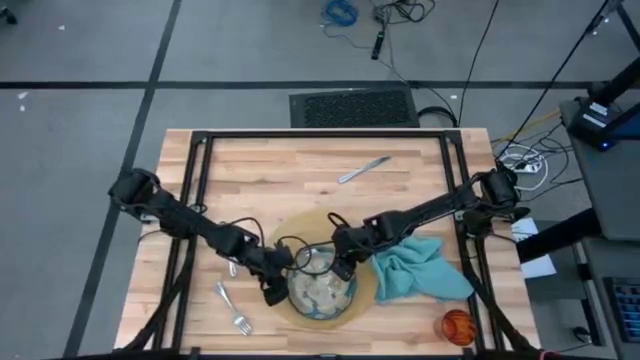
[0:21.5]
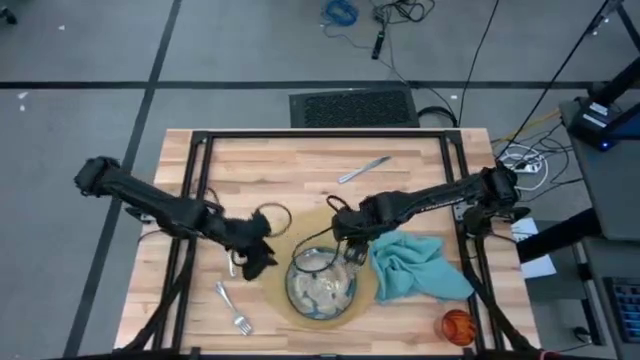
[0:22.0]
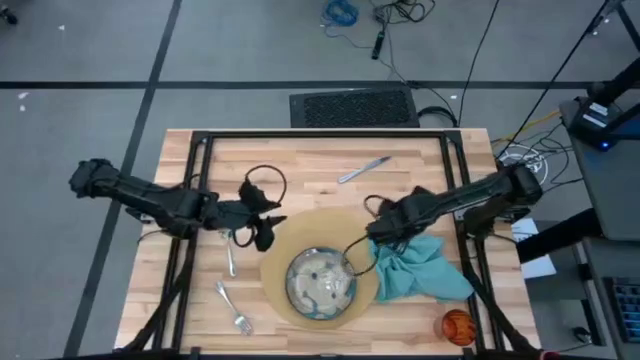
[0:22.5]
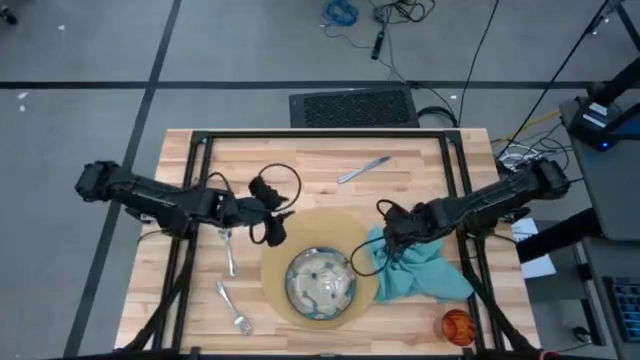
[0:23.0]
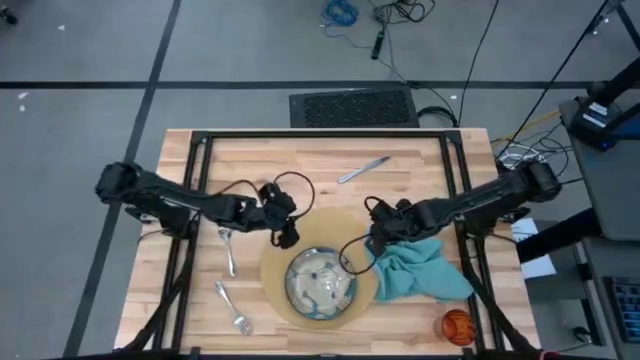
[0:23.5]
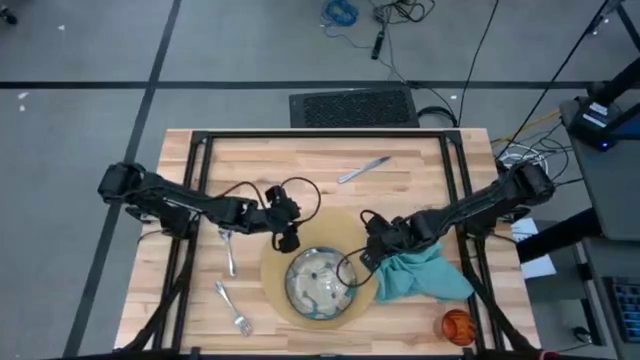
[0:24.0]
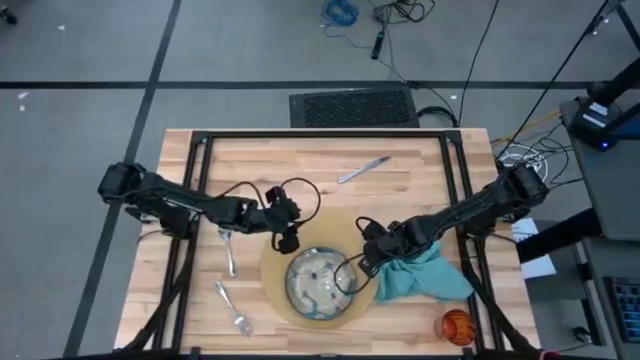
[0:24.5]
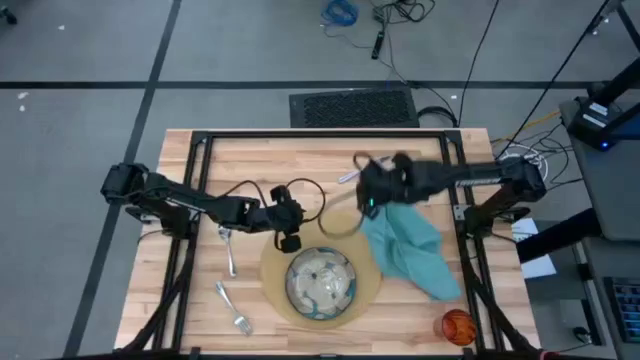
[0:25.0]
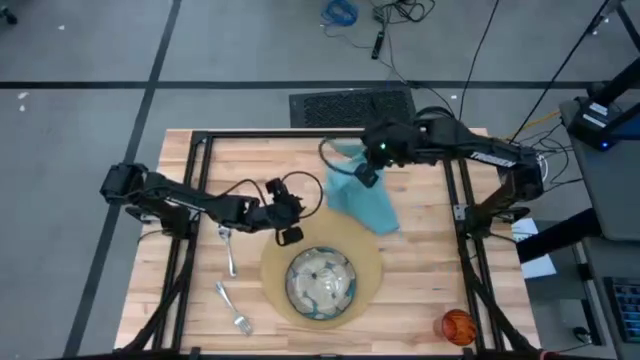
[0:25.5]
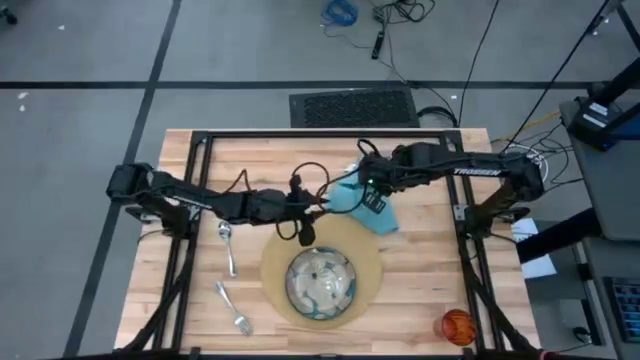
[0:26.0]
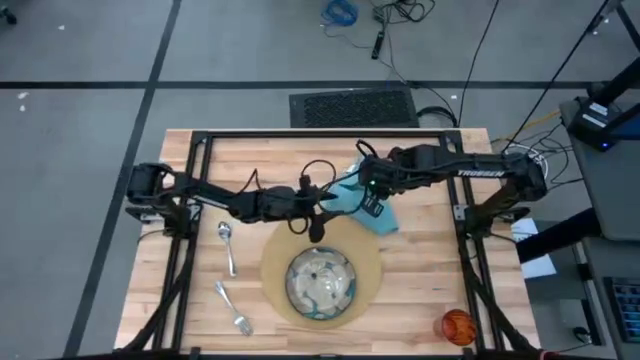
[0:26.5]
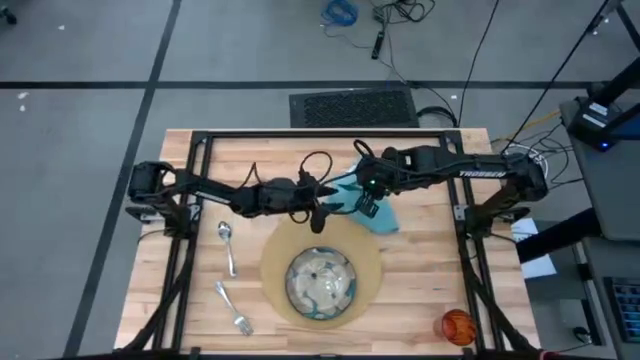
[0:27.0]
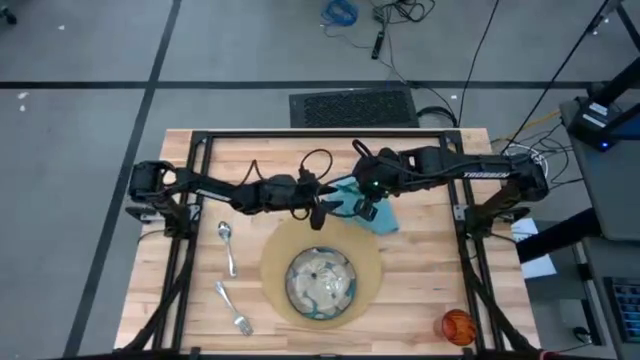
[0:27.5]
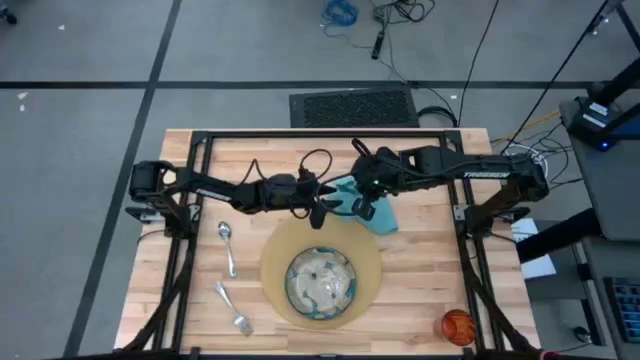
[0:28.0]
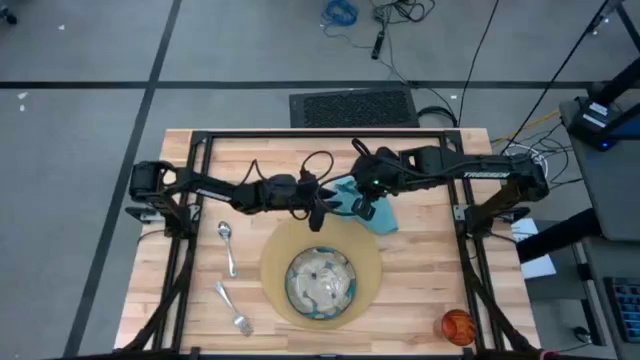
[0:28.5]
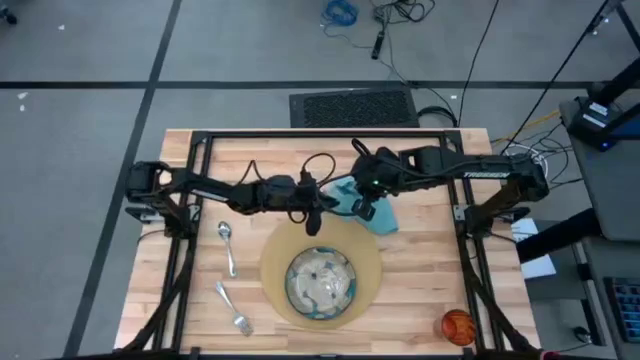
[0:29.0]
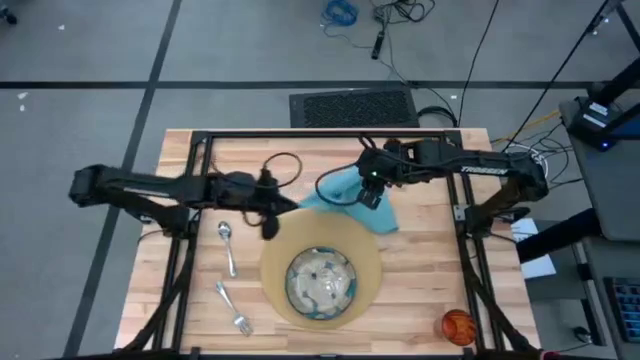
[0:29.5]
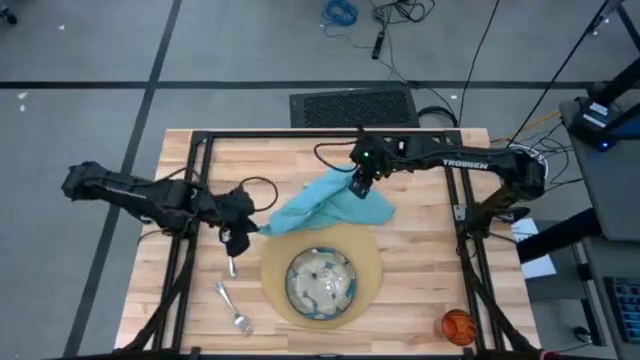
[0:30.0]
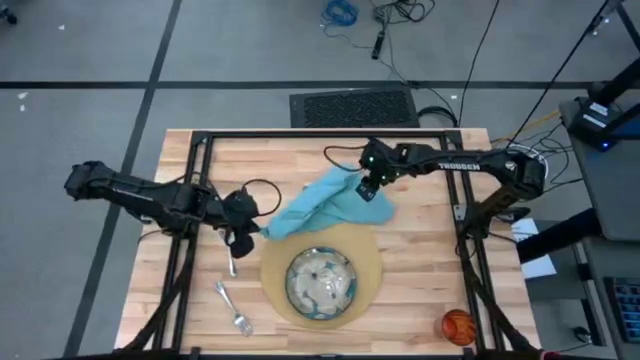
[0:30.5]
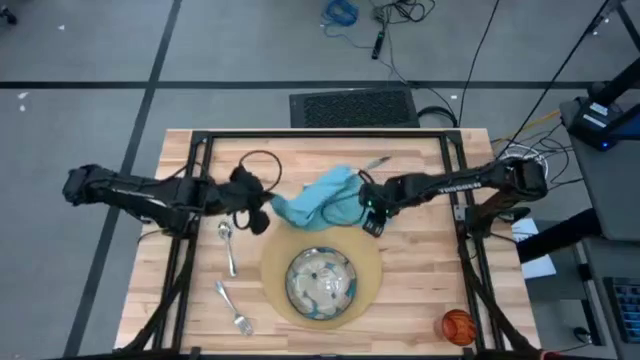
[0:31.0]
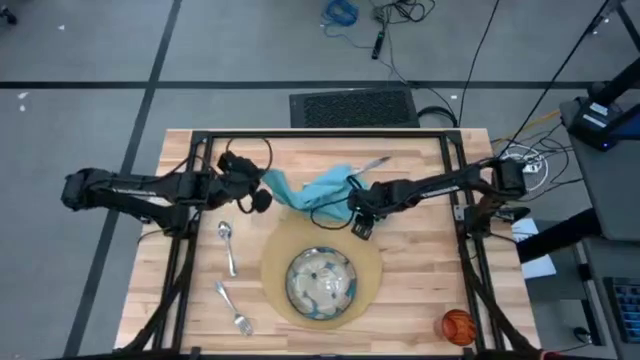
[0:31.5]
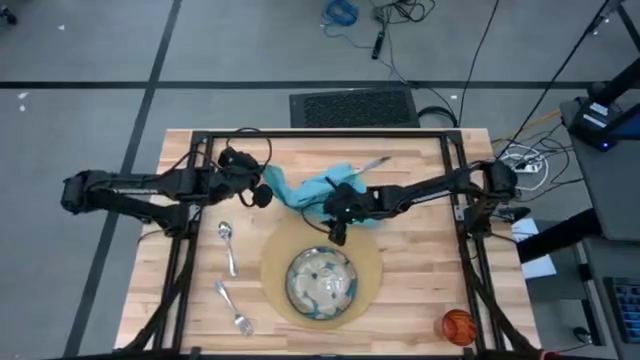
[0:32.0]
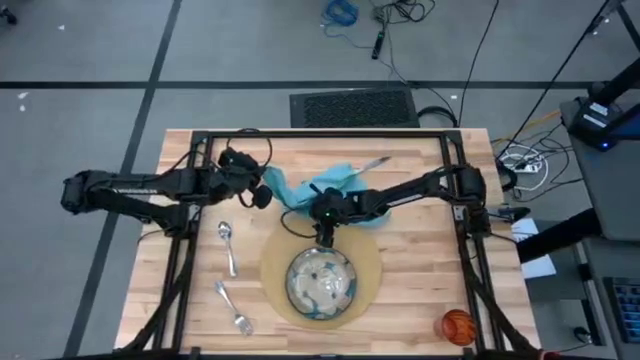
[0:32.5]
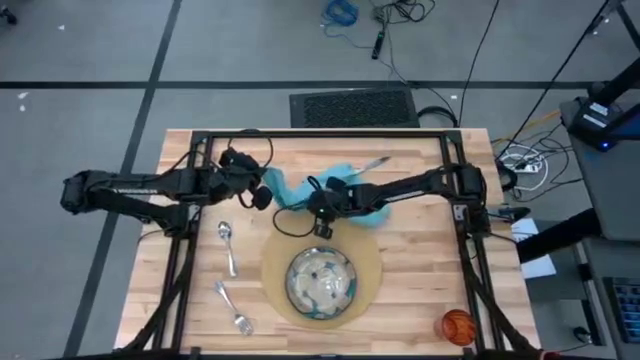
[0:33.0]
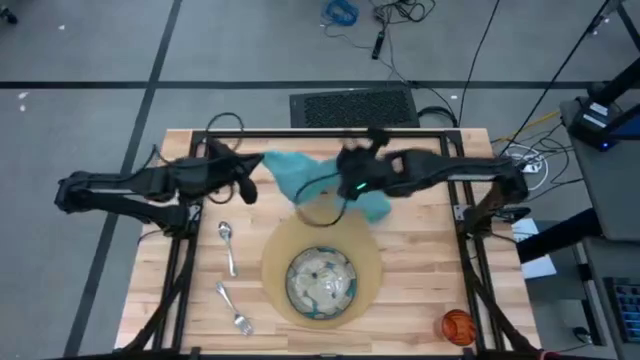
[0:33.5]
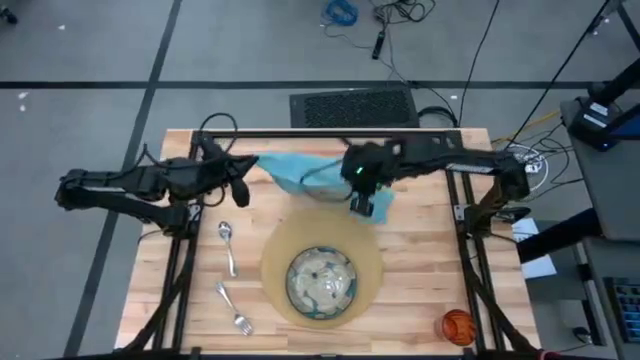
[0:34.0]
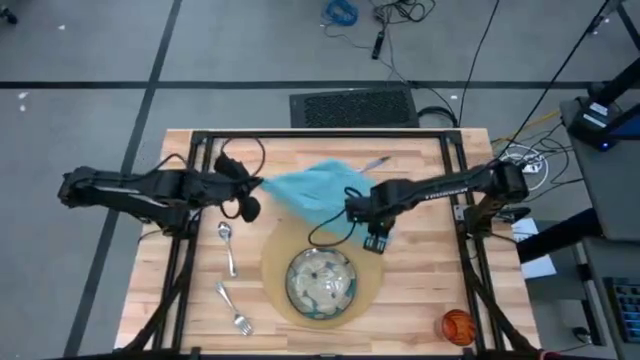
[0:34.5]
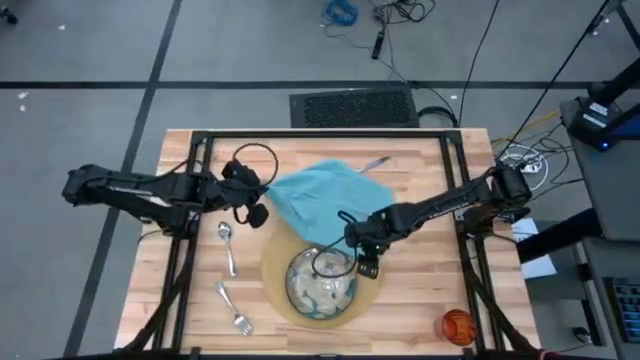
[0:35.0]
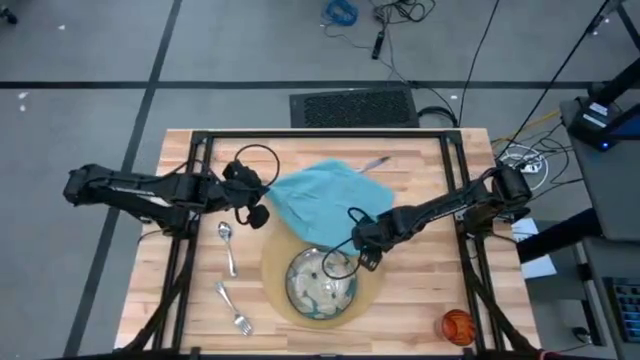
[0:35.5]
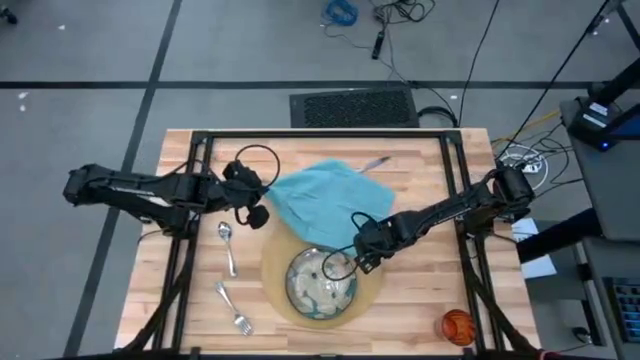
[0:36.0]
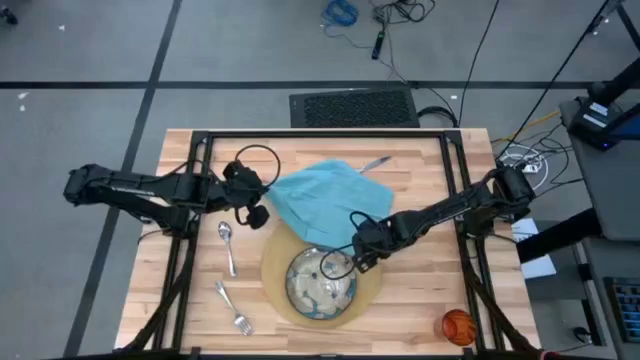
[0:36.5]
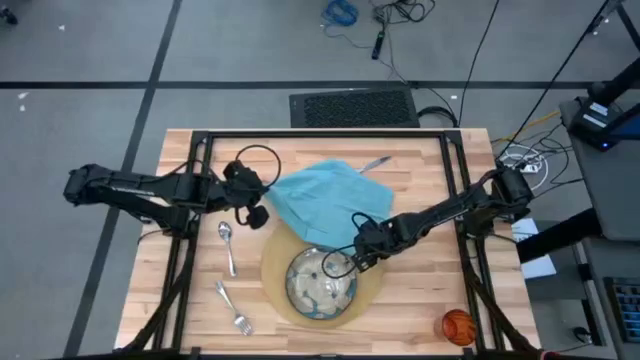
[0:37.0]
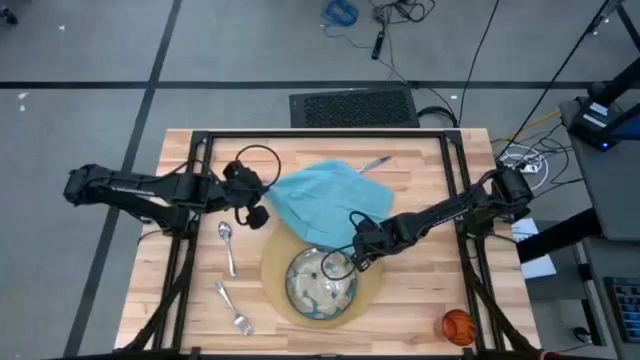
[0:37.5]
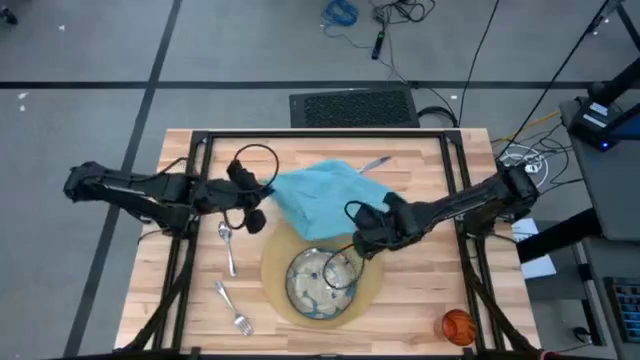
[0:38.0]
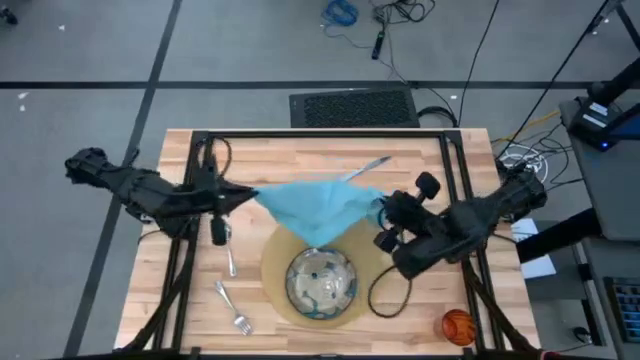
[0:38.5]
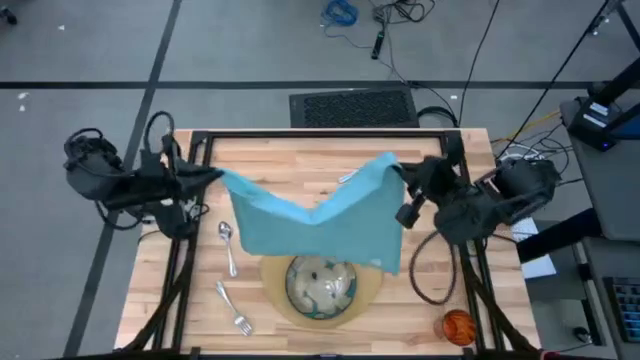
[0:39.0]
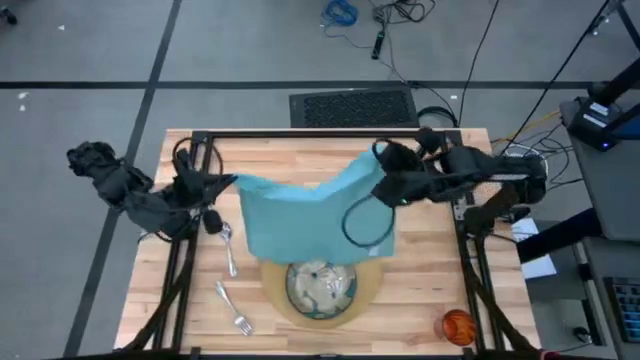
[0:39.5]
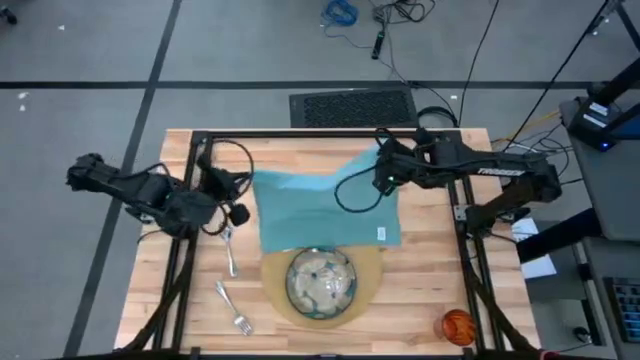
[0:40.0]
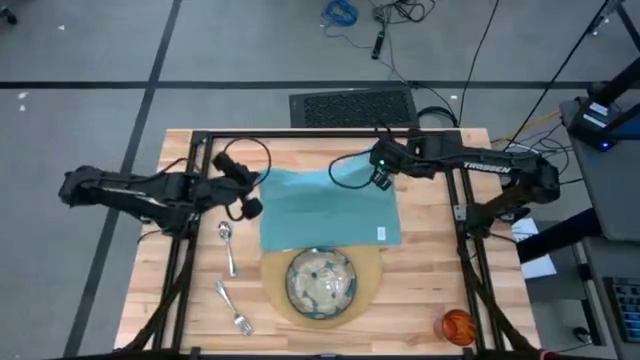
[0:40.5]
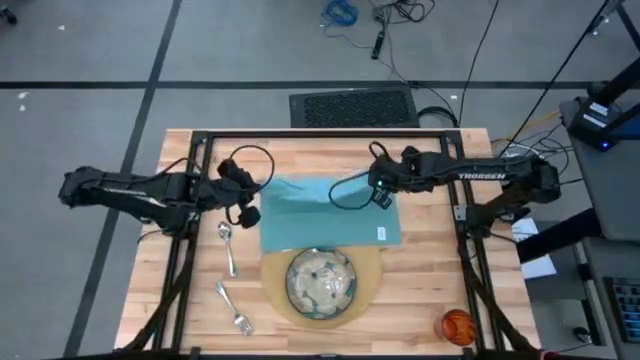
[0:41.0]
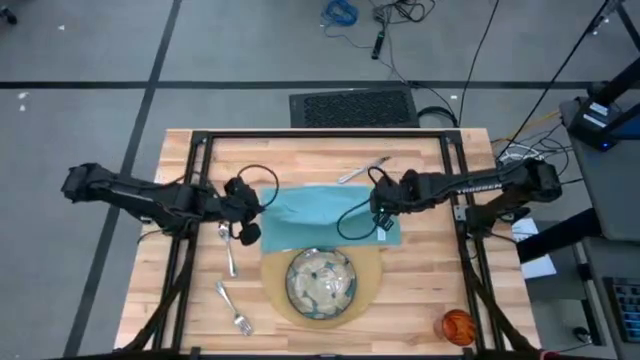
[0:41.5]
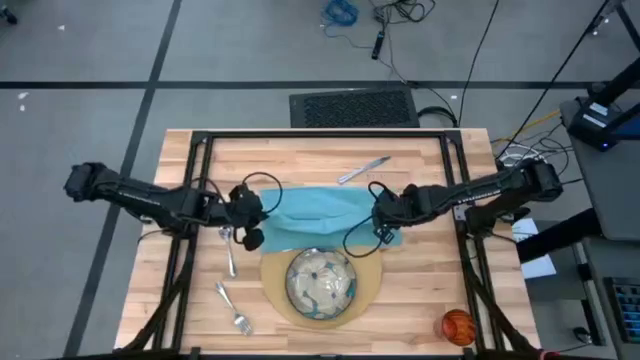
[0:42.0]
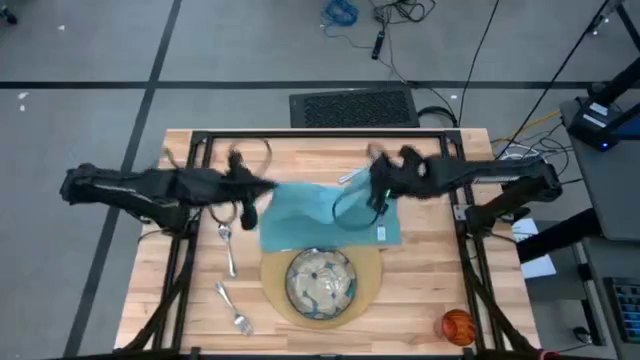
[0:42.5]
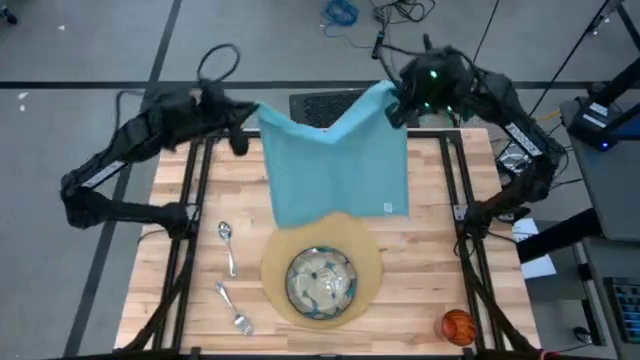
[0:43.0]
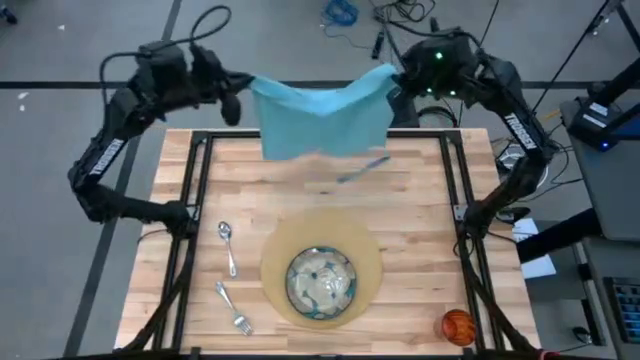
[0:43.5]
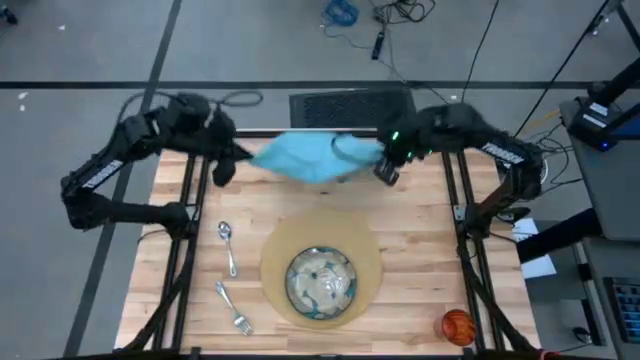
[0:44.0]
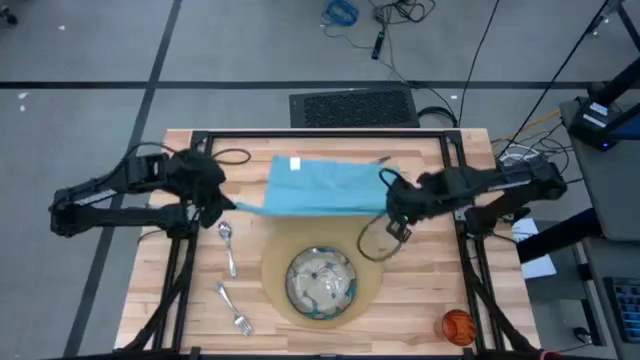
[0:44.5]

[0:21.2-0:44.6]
Task: Set table place
Fold the blue napkin
